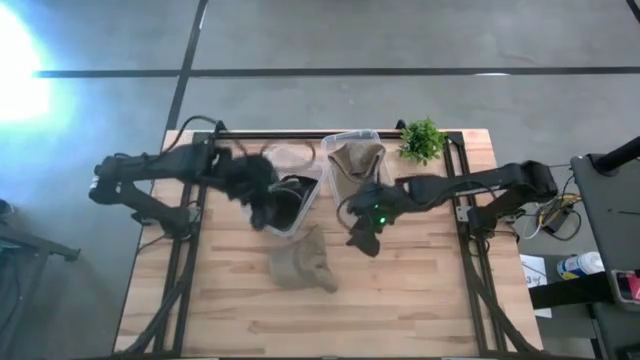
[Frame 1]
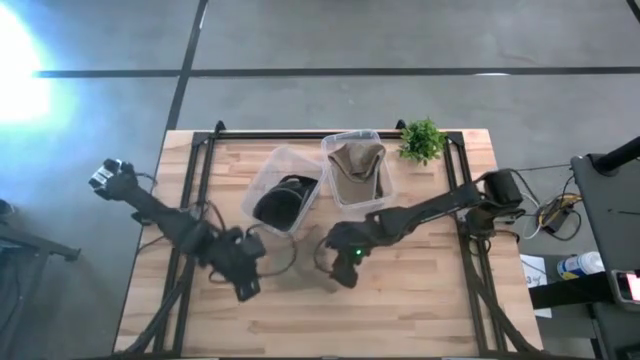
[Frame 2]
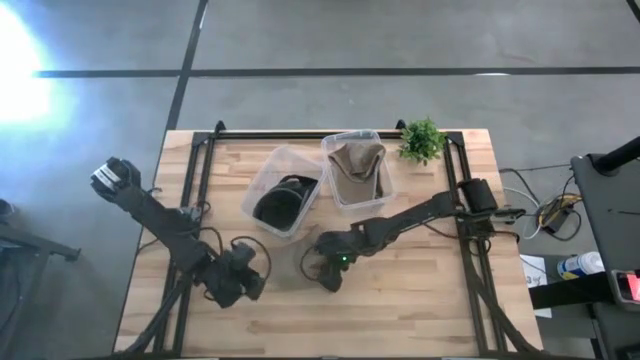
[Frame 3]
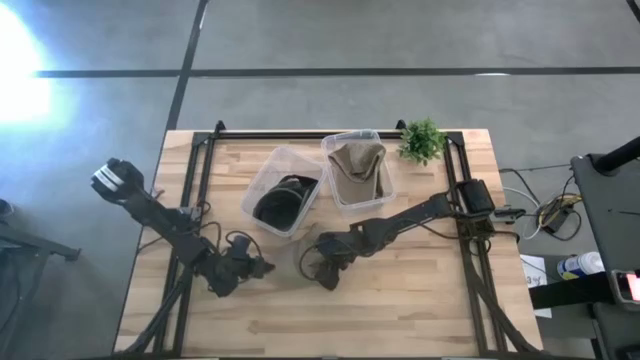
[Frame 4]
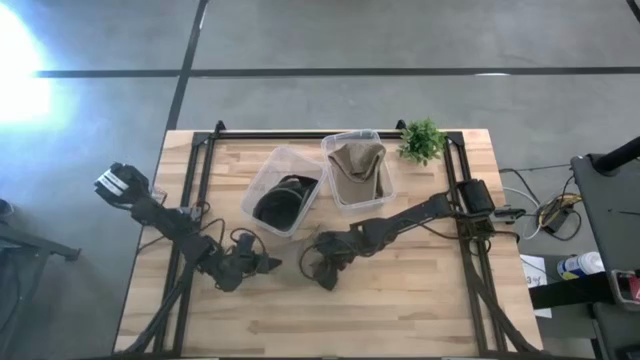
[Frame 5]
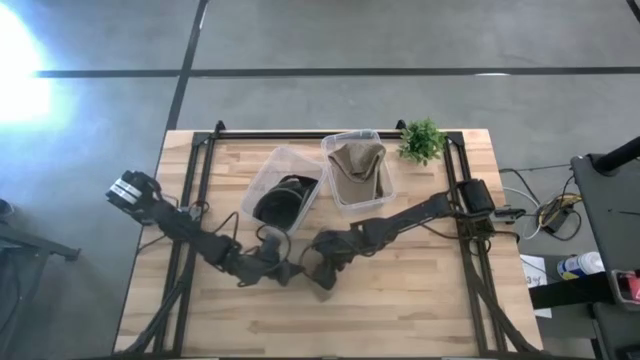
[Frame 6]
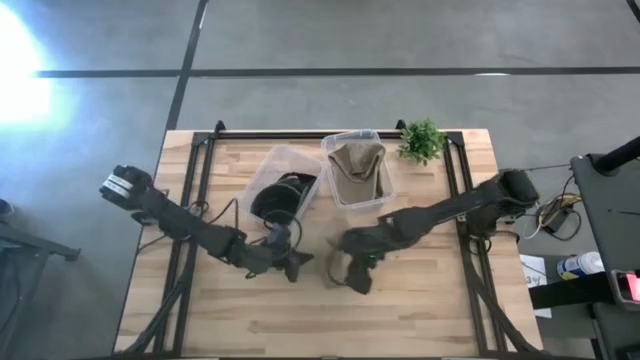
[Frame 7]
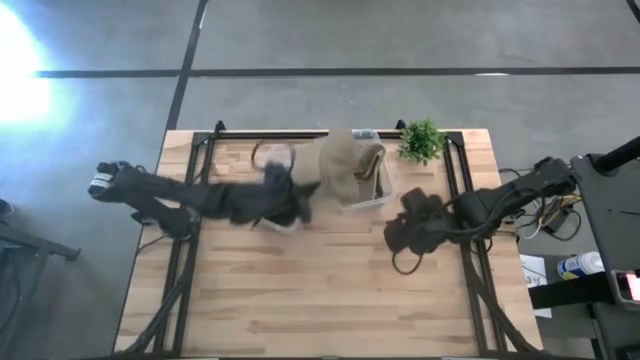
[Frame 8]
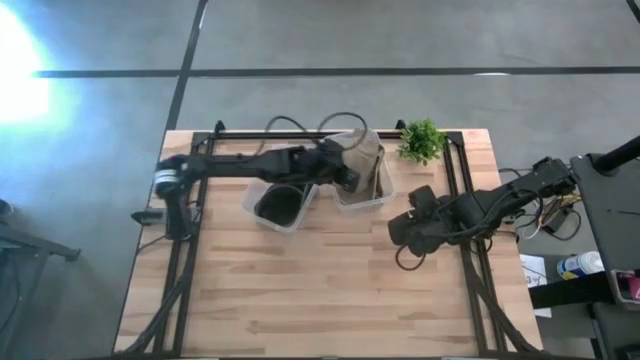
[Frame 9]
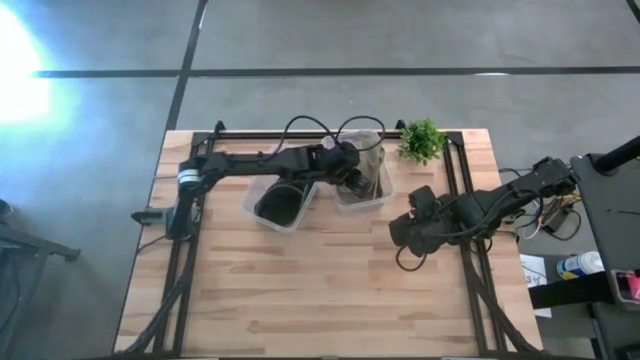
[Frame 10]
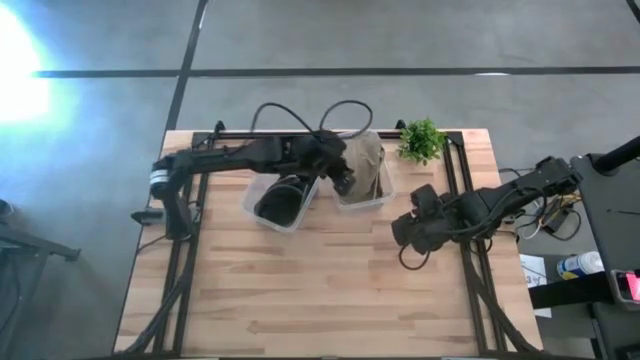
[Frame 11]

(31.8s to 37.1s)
Task: Pick & Place hat
Put the brown cap into the right transparent bin

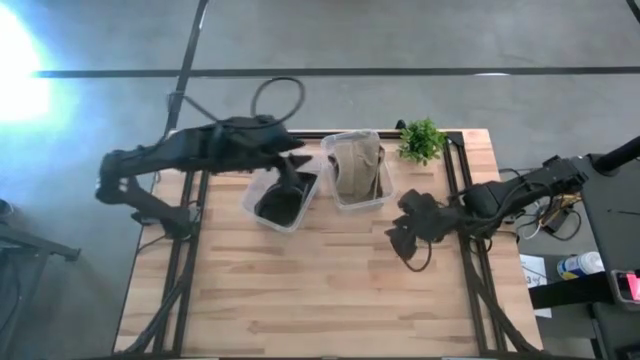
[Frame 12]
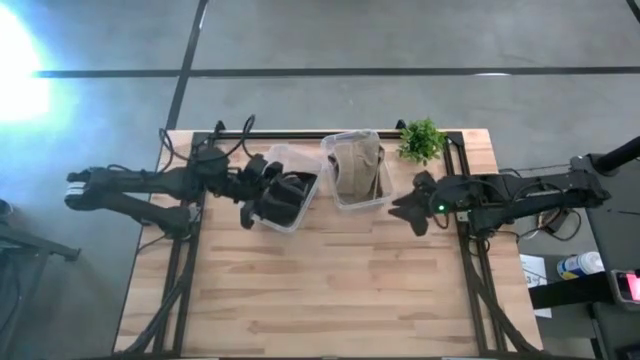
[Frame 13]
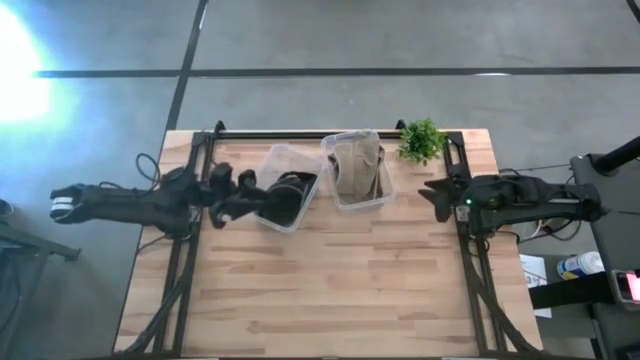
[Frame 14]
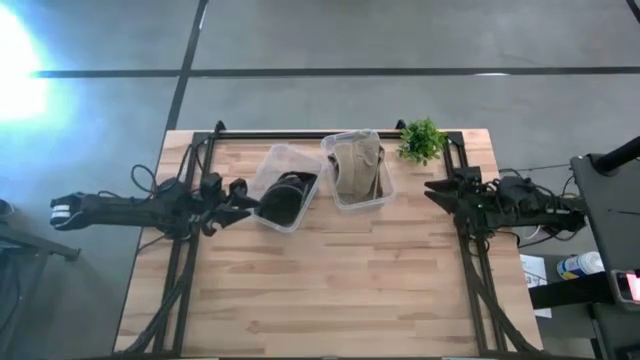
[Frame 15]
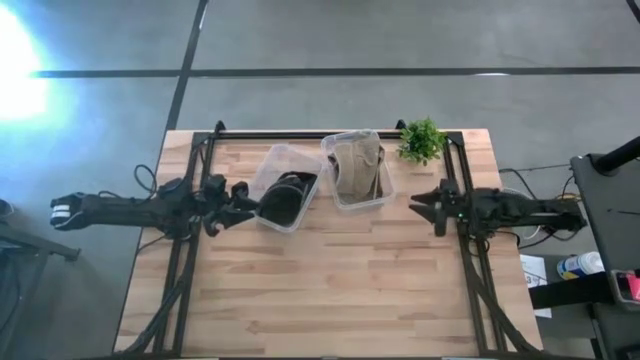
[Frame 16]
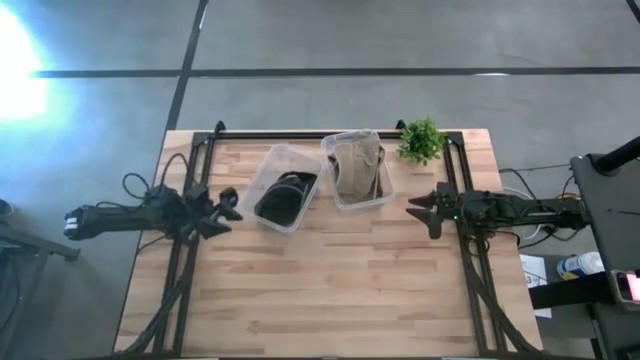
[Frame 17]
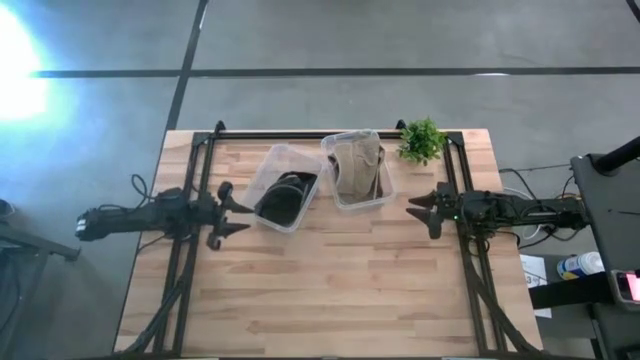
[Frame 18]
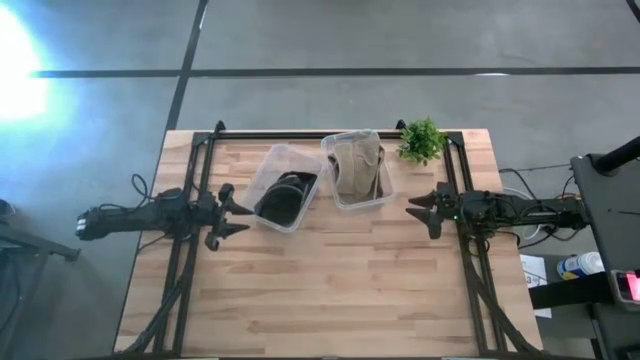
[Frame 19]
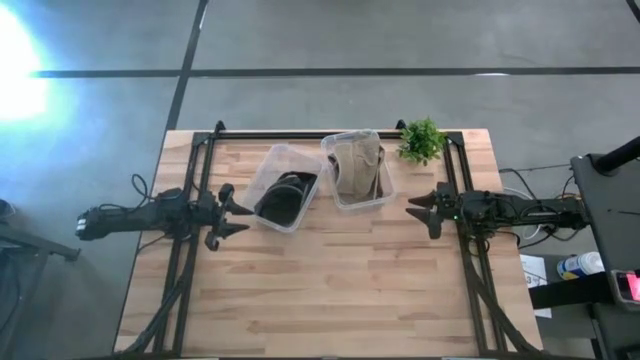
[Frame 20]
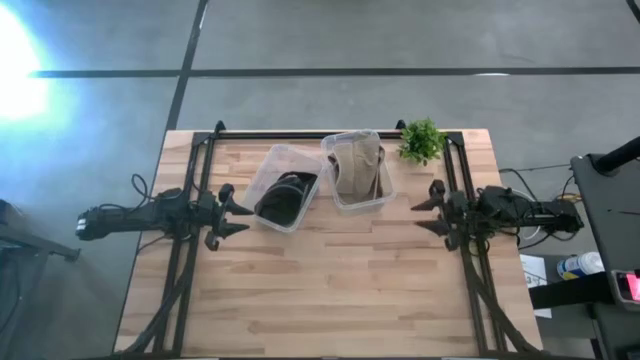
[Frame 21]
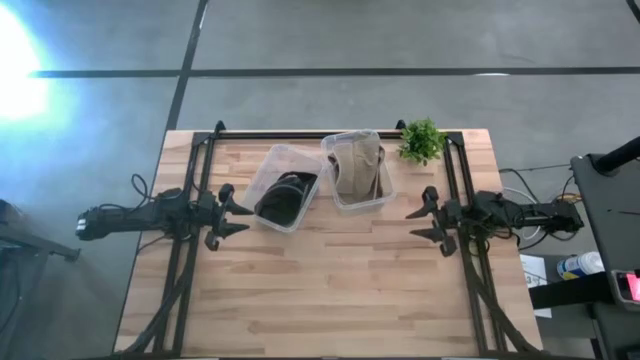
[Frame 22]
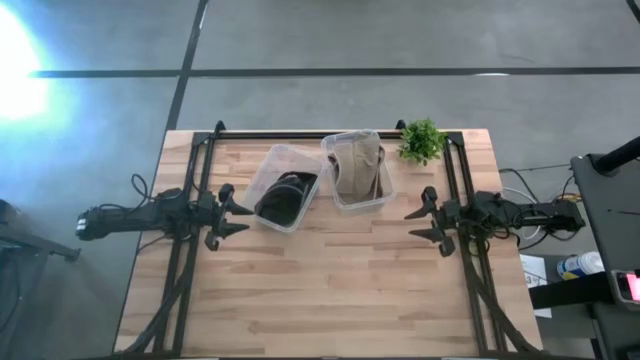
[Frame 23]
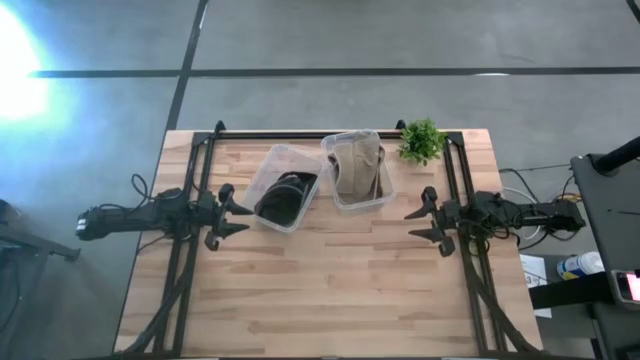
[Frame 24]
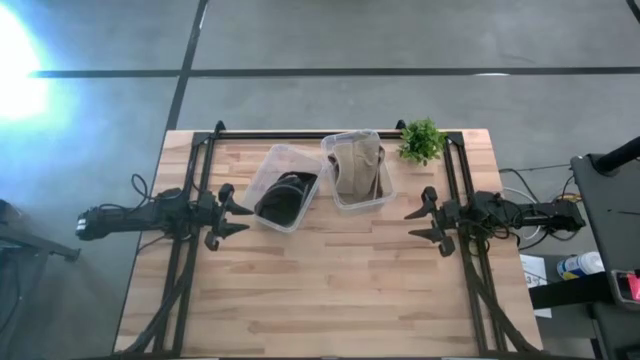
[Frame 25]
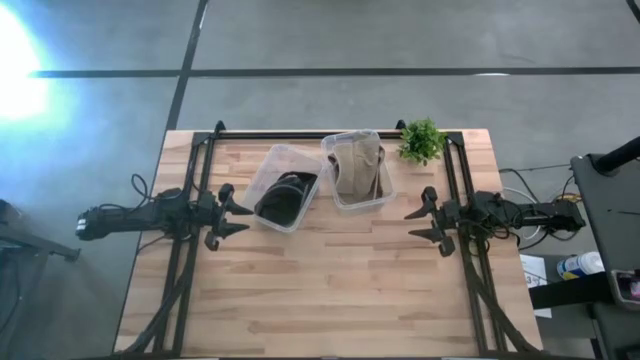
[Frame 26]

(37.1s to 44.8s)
Return to Home Position

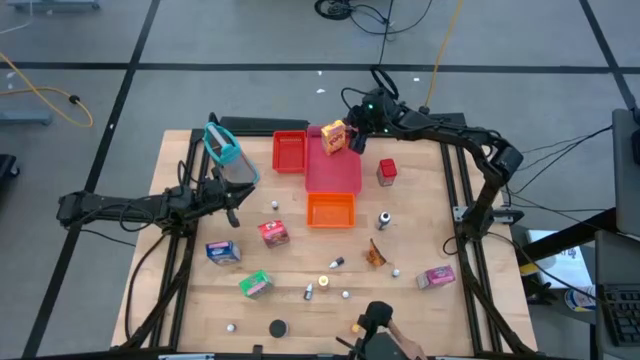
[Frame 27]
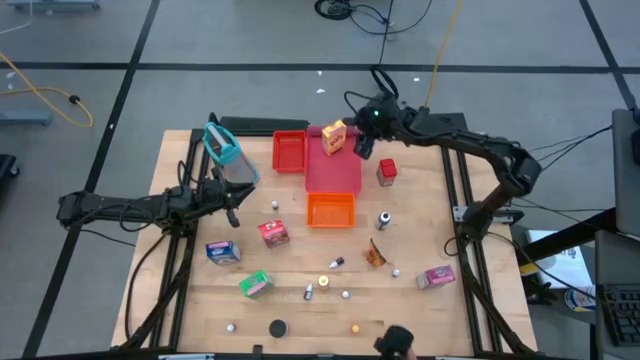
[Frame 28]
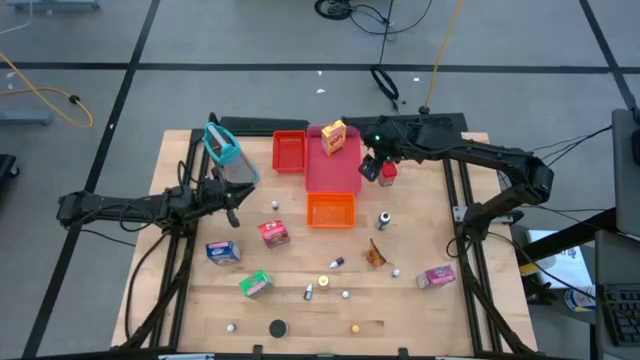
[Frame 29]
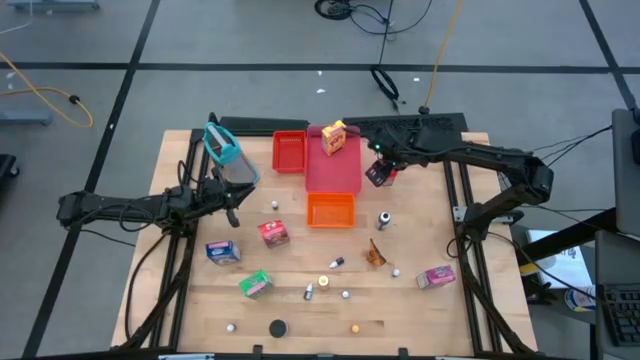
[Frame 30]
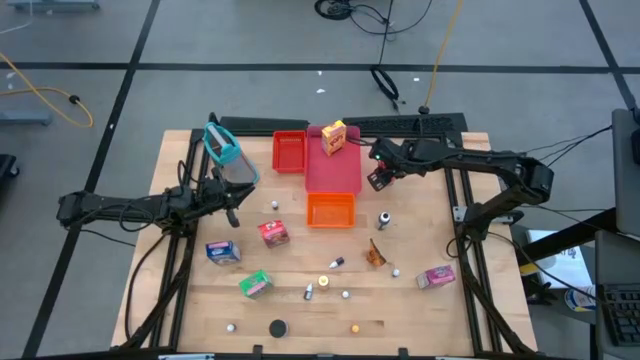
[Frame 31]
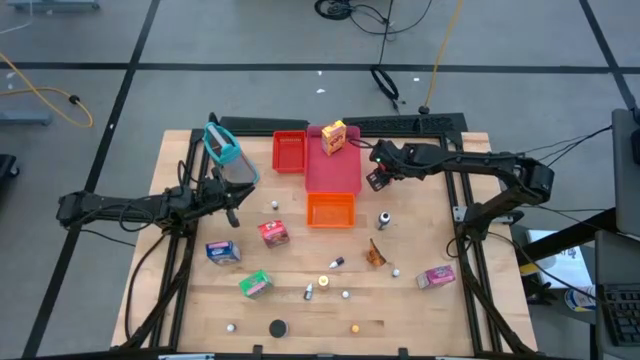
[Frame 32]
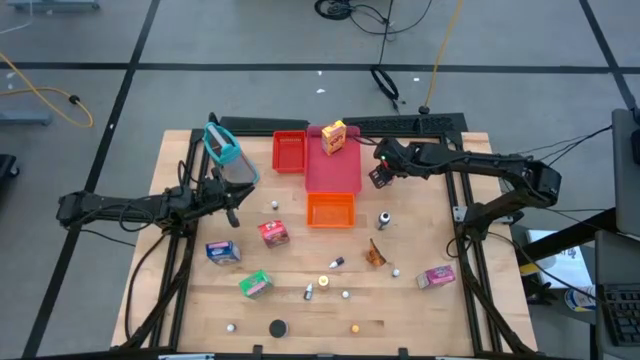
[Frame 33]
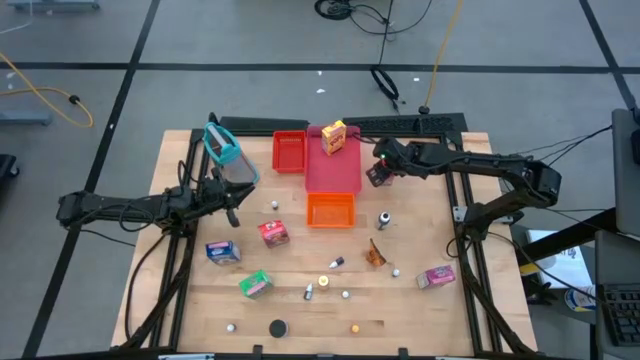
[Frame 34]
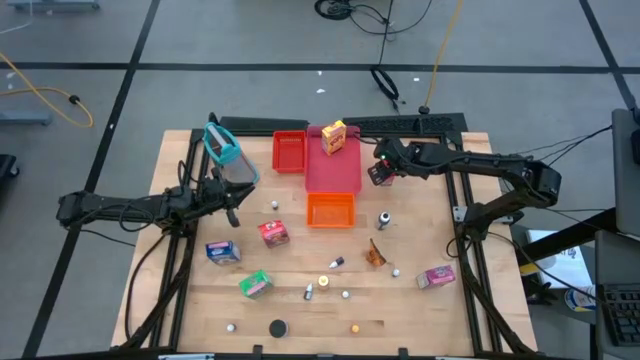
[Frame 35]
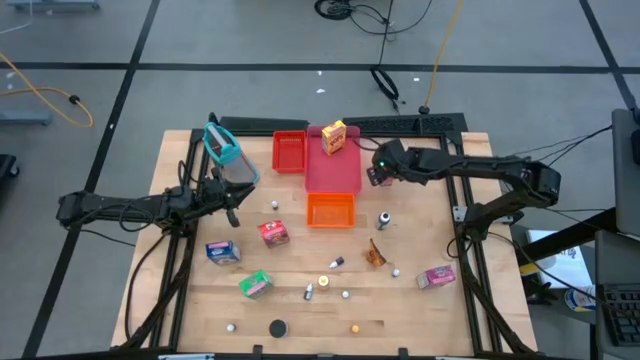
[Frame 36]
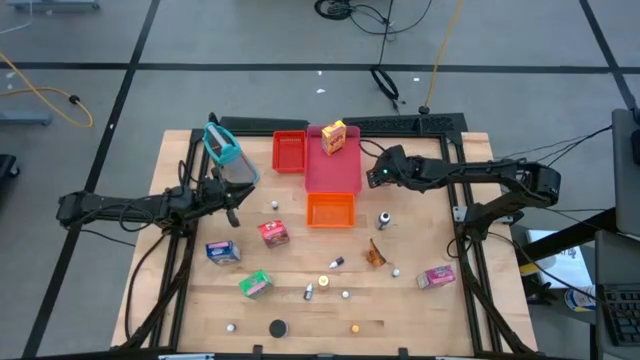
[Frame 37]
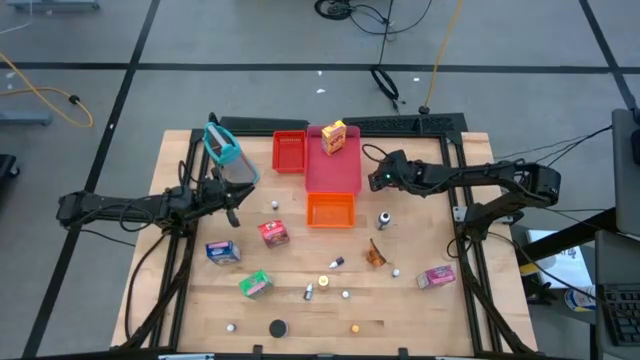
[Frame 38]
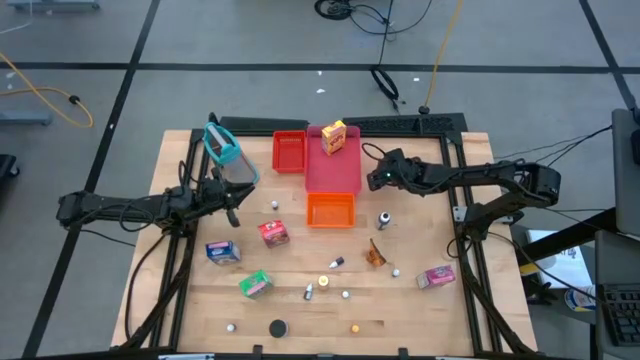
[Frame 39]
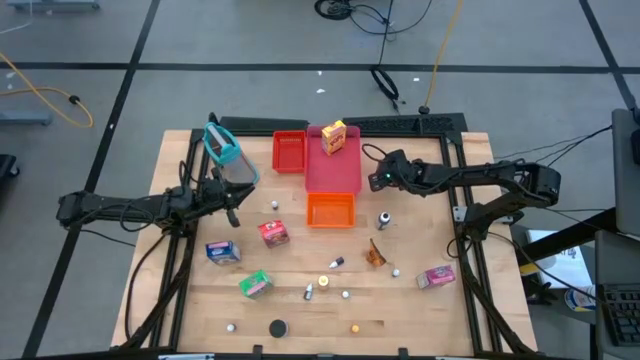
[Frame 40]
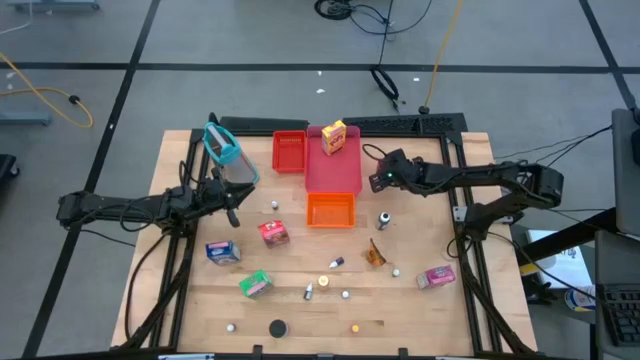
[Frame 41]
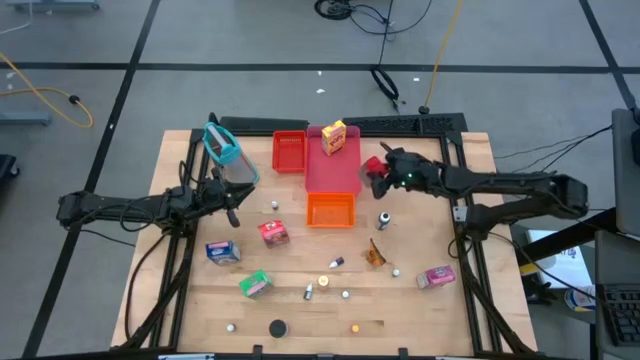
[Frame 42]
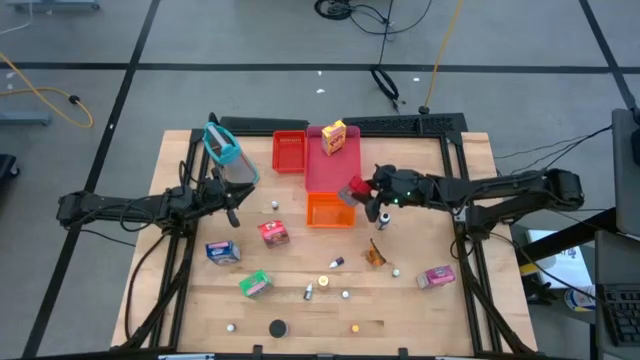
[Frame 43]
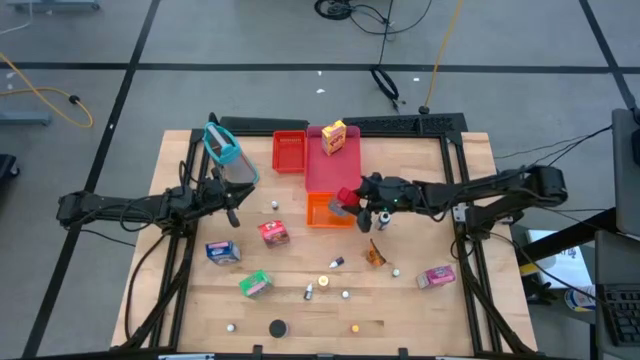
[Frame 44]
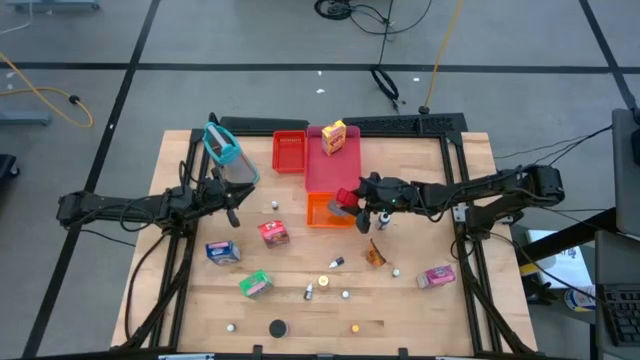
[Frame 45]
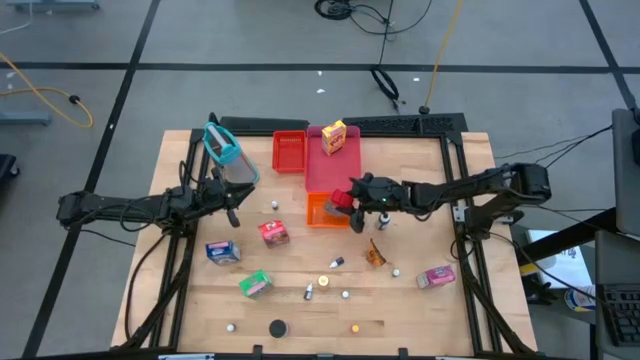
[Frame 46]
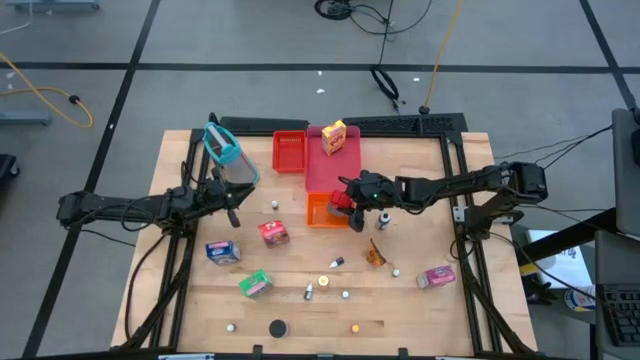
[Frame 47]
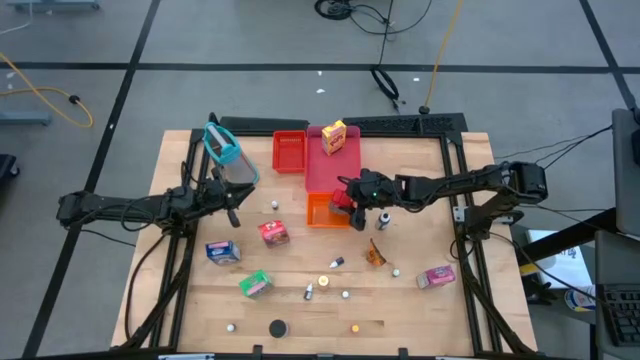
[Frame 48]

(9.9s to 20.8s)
Task: Pick & Place Kitchen Items
Put the red spice can into the orange bin
